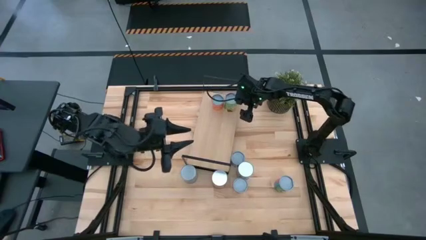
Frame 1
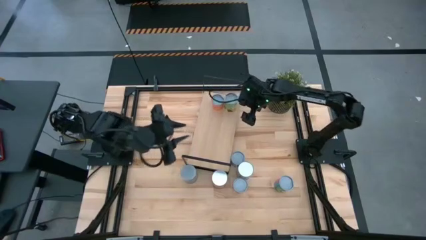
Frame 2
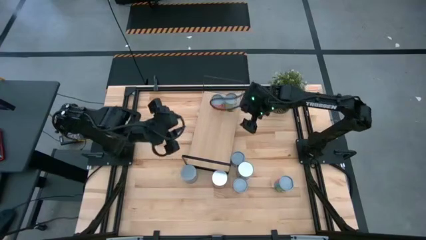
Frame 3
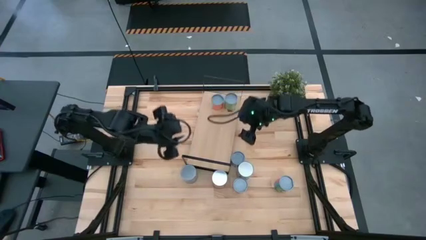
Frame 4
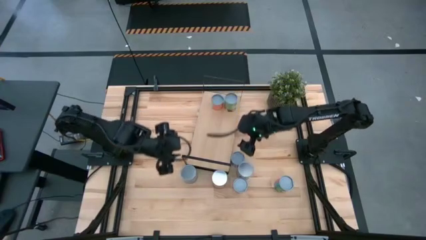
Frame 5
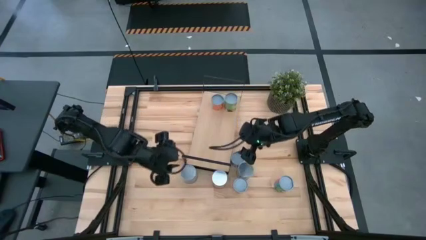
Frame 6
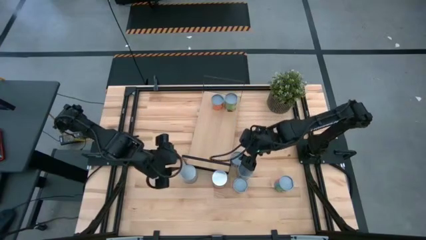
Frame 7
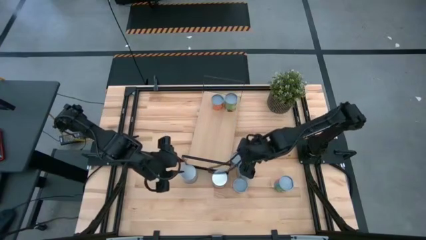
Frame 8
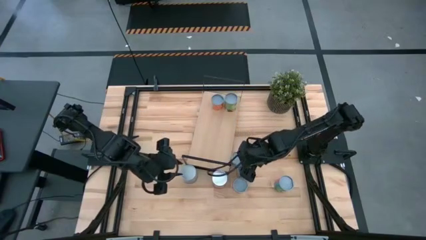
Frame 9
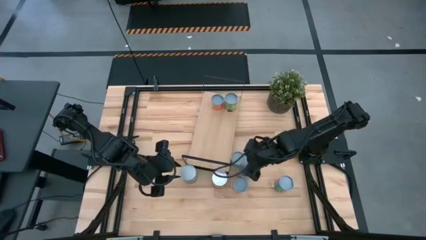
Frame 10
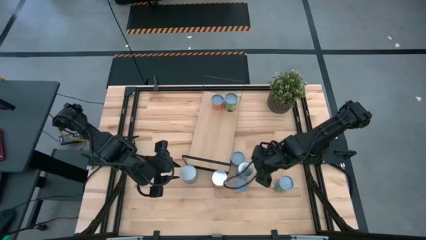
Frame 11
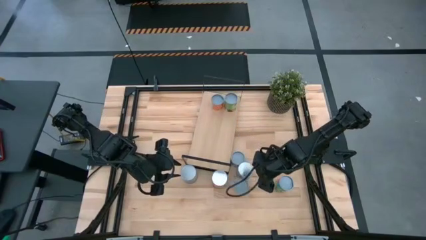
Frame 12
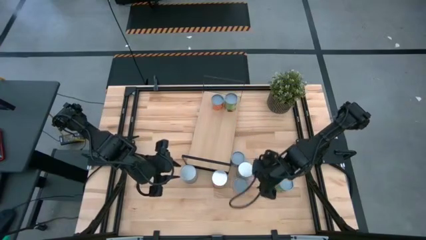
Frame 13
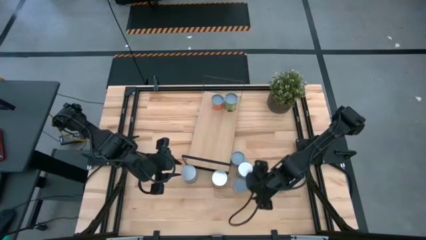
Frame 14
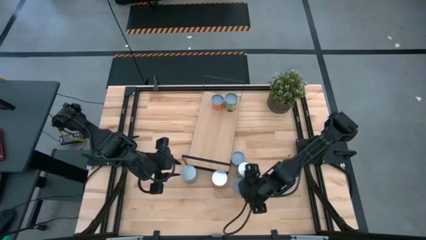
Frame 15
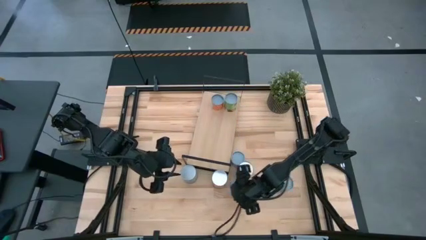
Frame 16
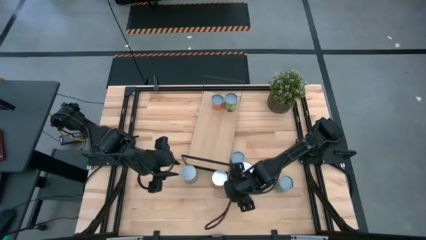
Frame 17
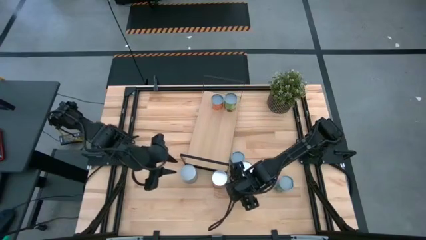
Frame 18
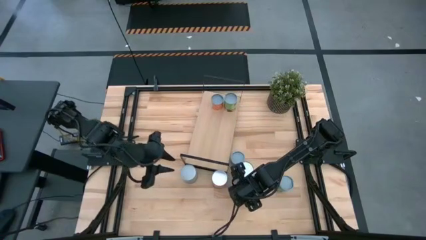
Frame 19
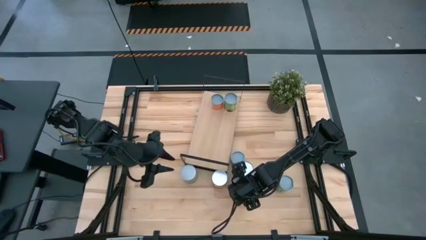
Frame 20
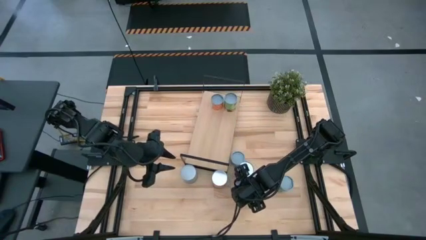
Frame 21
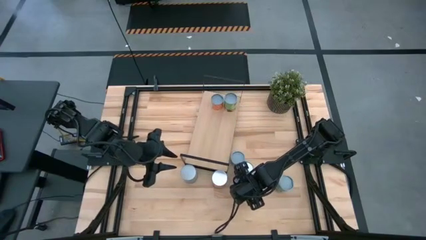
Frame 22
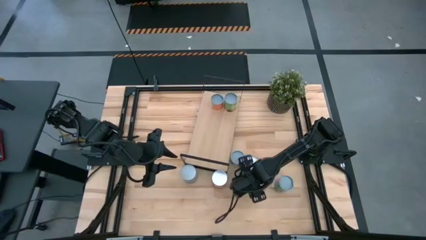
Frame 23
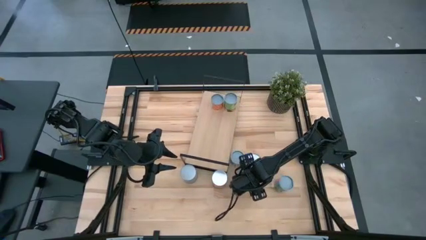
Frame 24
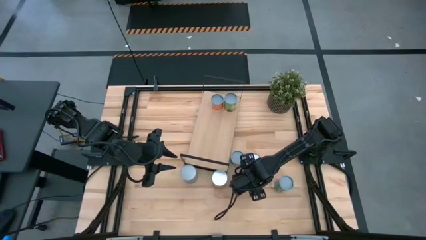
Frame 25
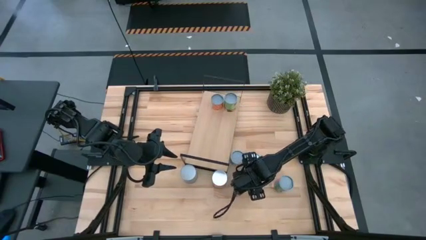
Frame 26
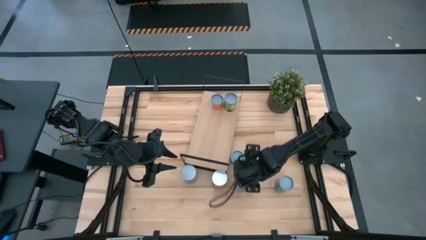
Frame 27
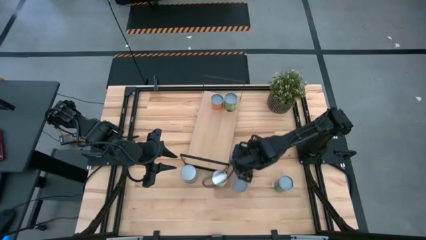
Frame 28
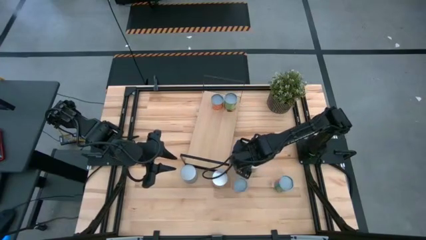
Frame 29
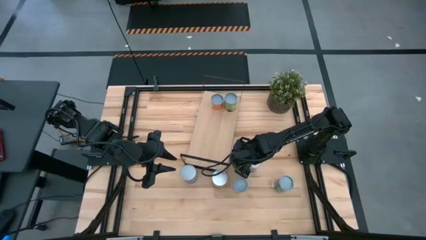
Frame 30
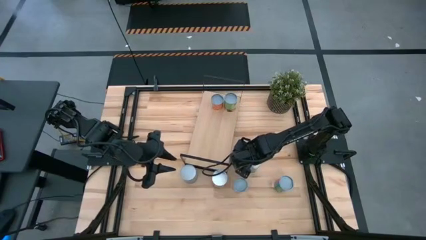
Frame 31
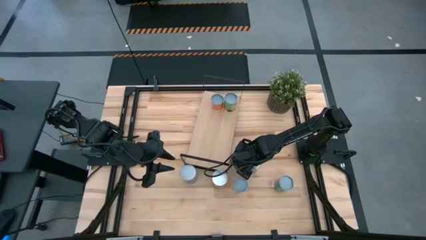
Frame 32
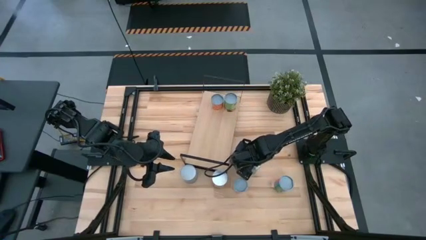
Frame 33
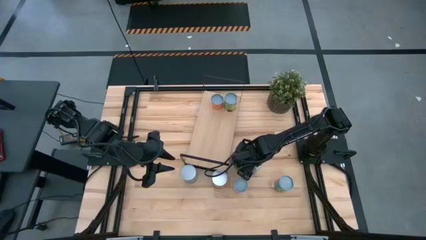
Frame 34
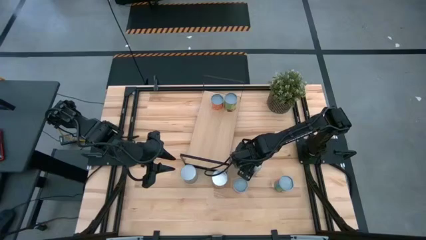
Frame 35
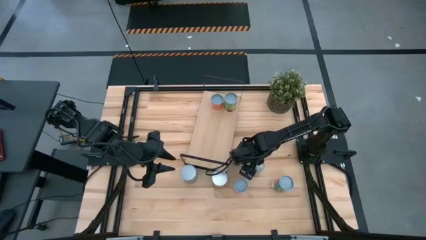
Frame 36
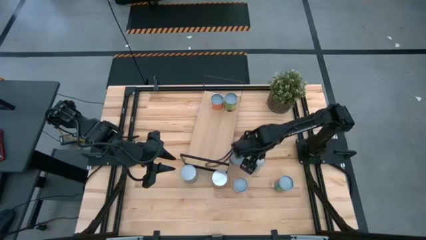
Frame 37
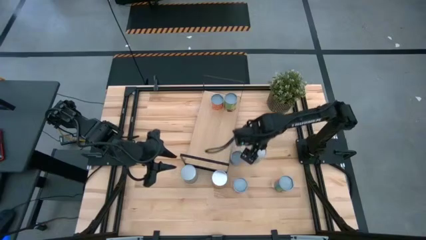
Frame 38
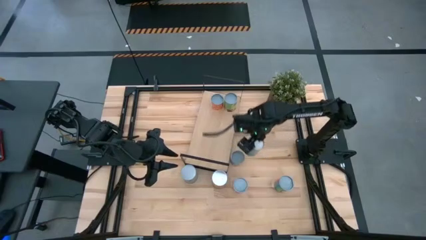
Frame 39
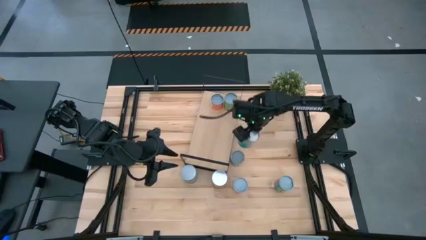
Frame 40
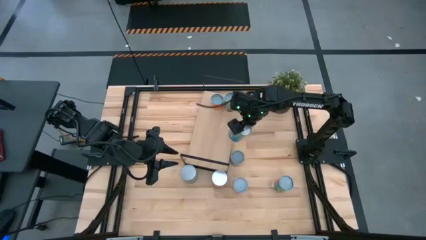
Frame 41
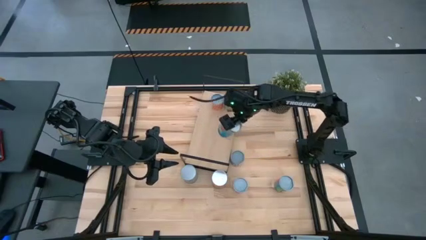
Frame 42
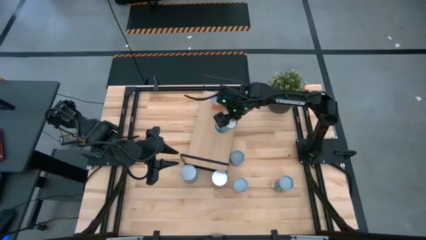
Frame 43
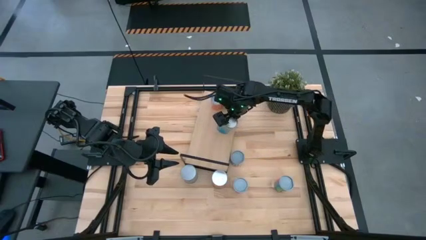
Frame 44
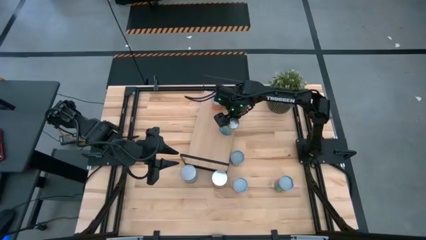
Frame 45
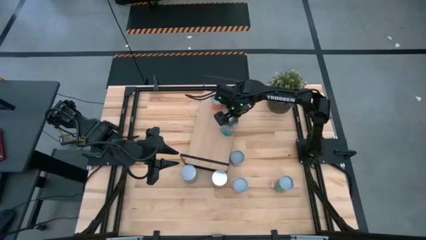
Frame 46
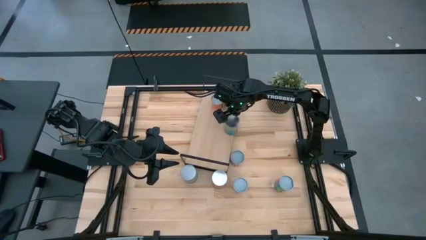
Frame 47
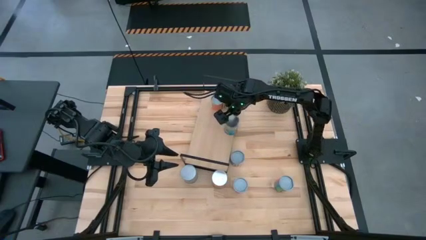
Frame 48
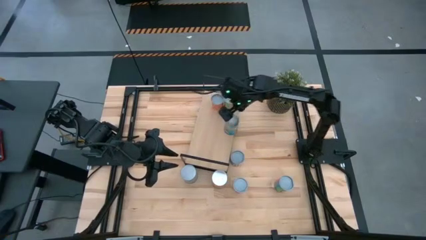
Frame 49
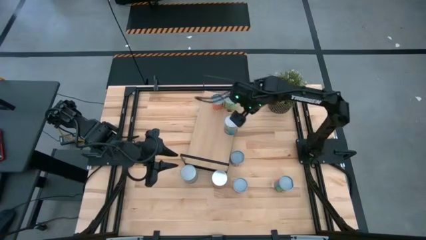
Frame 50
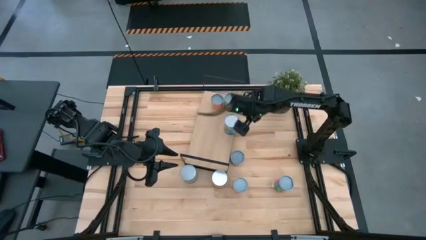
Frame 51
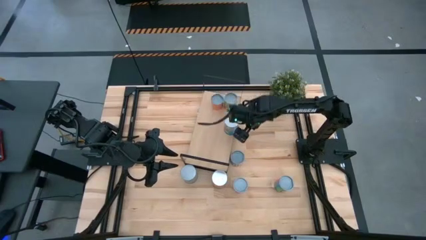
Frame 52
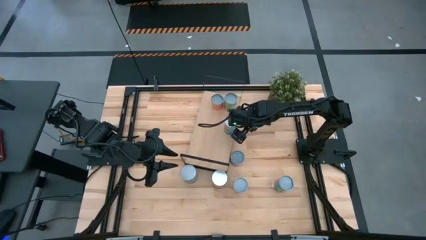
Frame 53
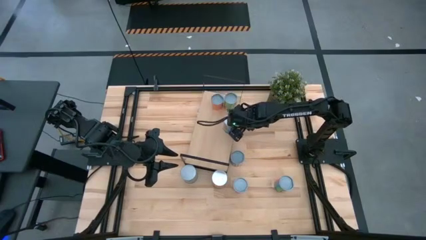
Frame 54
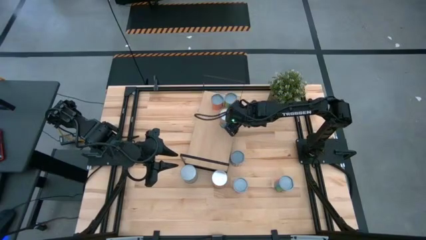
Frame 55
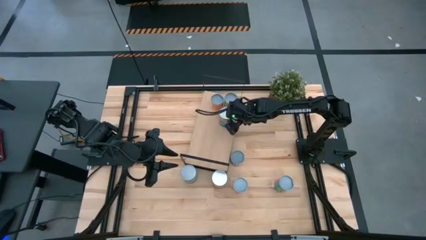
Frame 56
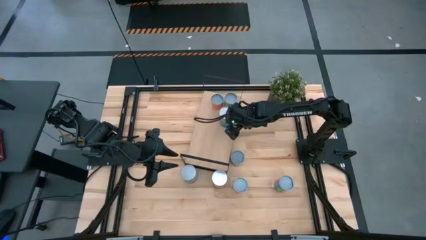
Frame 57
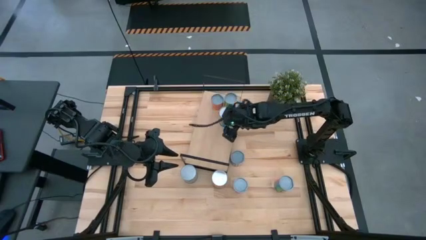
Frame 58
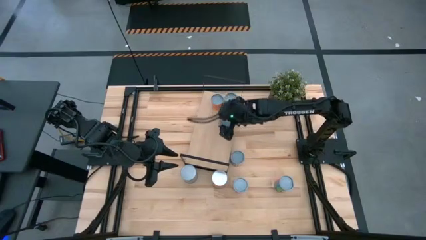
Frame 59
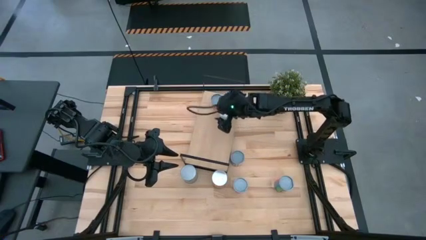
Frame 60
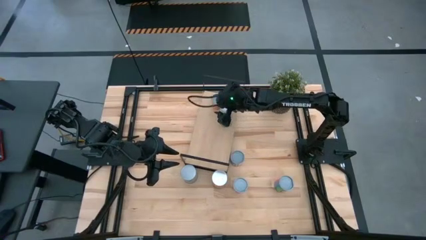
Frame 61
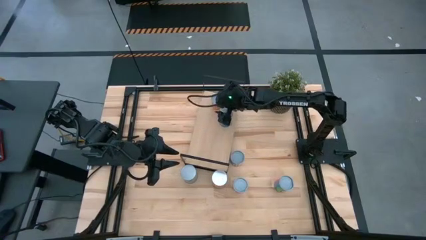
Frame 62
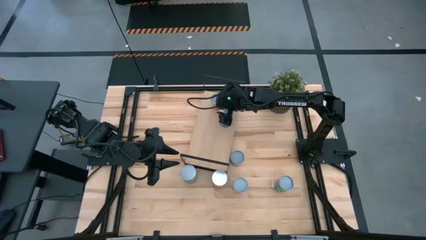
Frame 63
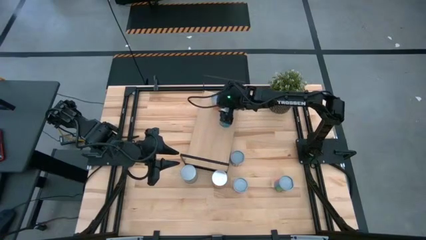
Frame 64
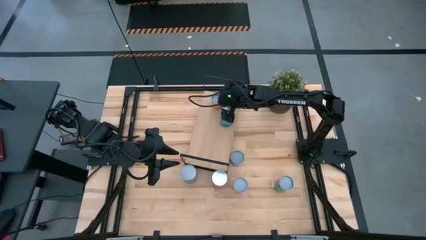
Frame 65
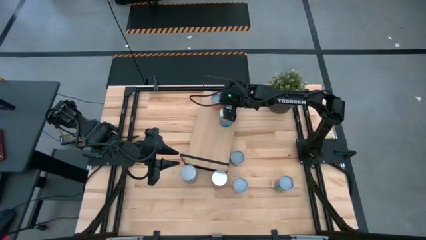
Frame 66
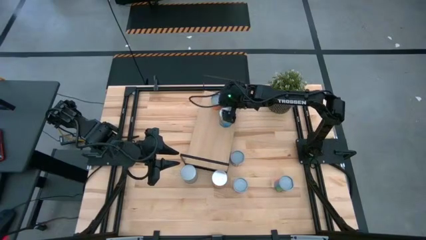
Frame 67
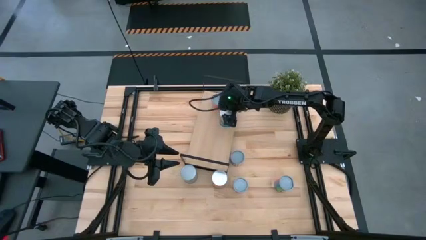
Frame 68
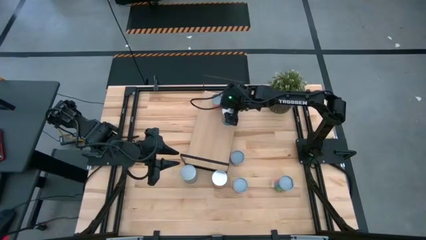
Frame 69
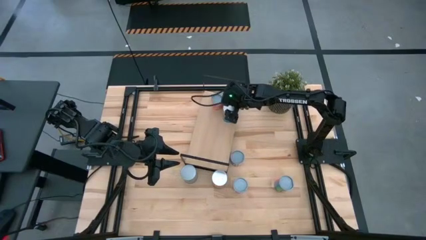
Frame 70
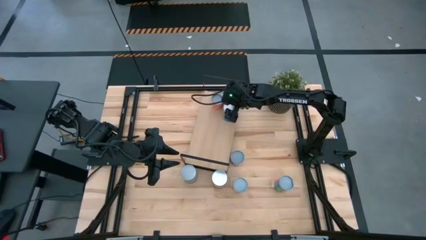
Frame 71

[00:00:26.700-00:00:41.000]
Task: Pick and place cans onto a shelf
Put the right blue can on the shelf
